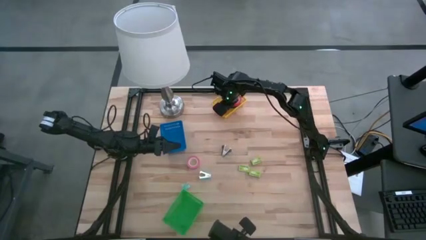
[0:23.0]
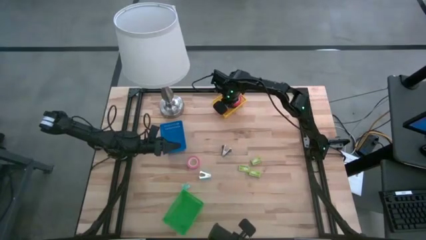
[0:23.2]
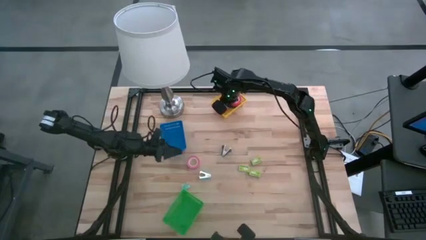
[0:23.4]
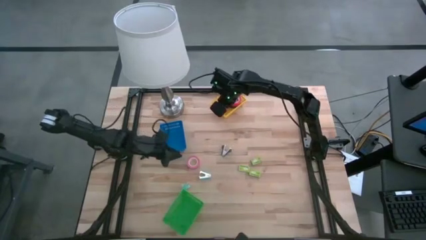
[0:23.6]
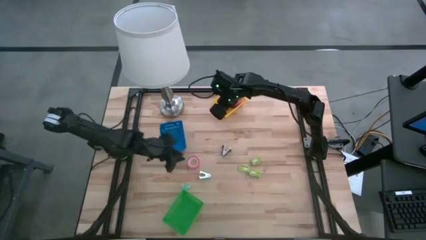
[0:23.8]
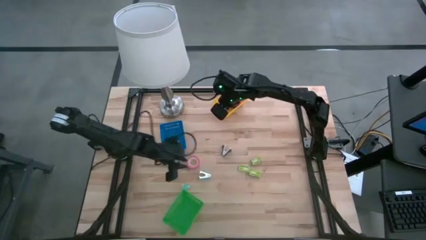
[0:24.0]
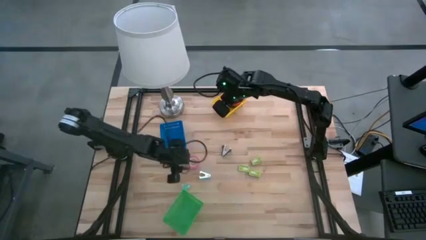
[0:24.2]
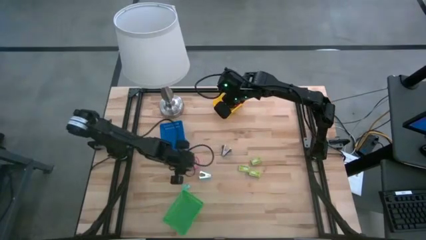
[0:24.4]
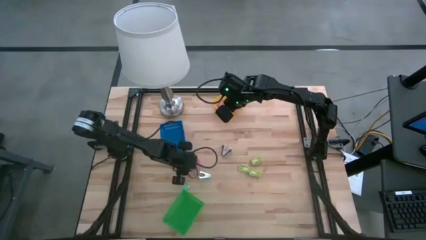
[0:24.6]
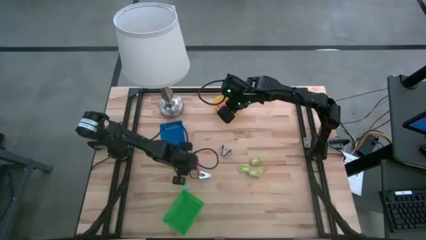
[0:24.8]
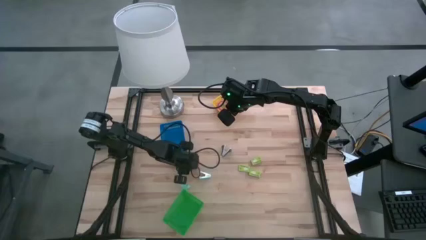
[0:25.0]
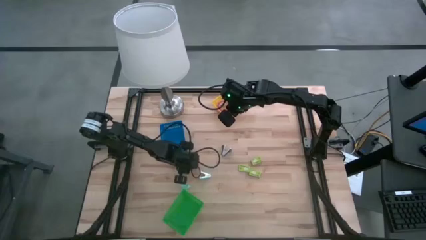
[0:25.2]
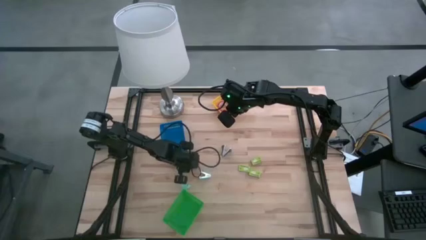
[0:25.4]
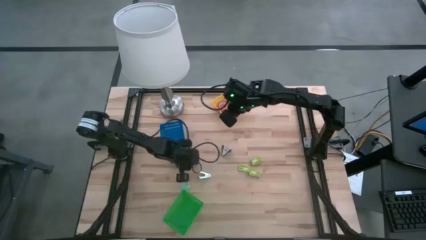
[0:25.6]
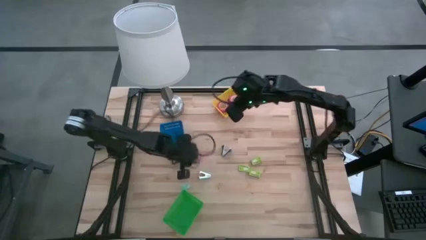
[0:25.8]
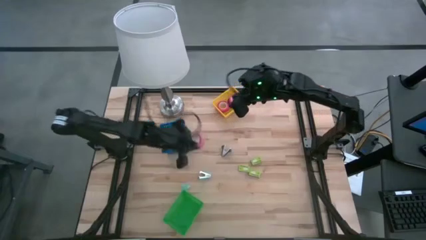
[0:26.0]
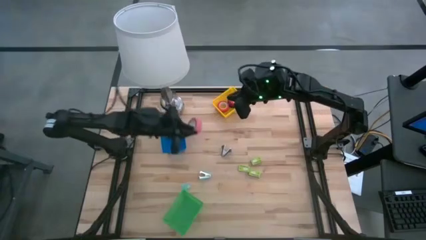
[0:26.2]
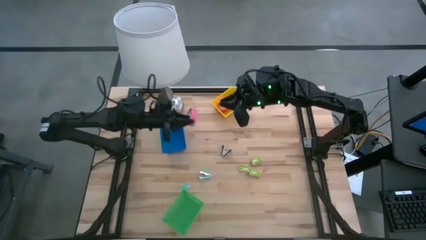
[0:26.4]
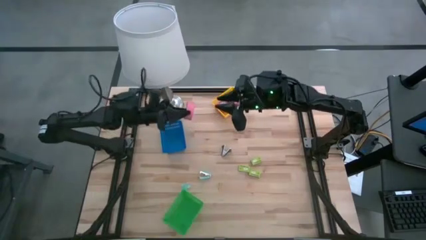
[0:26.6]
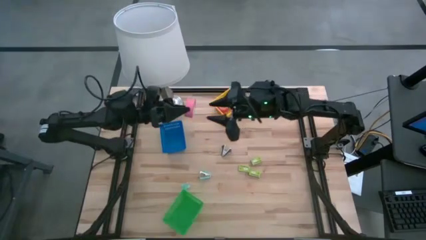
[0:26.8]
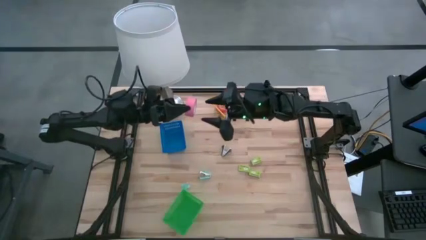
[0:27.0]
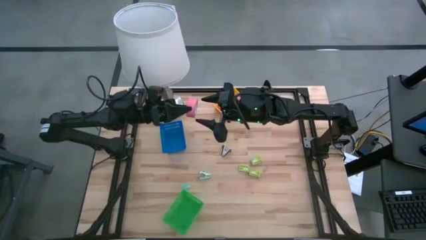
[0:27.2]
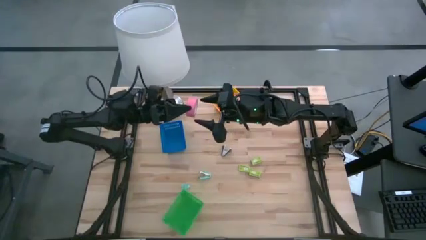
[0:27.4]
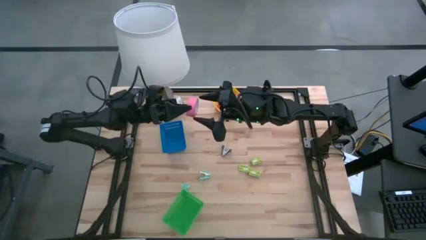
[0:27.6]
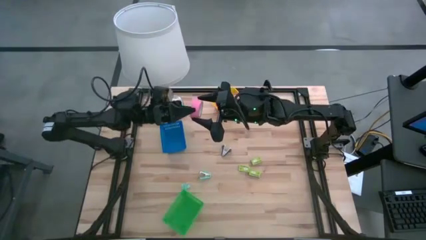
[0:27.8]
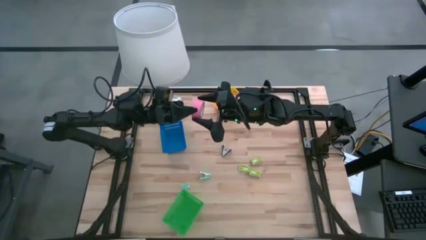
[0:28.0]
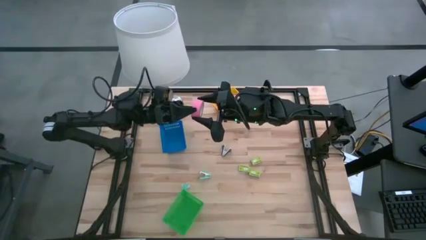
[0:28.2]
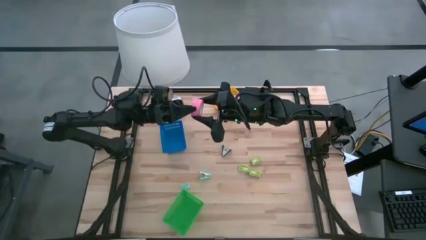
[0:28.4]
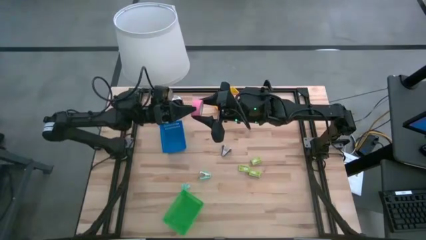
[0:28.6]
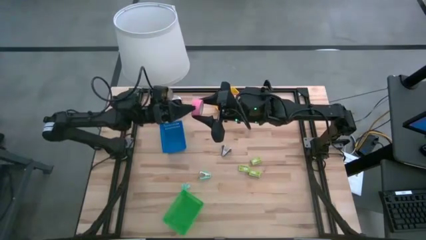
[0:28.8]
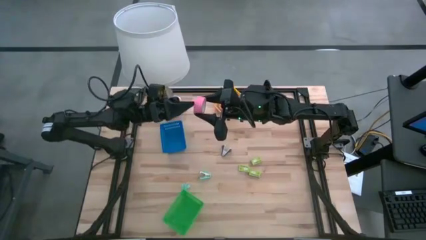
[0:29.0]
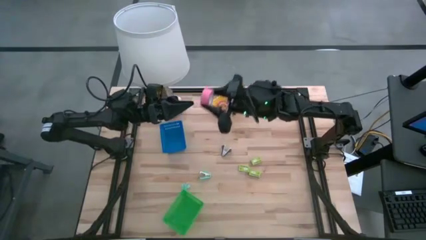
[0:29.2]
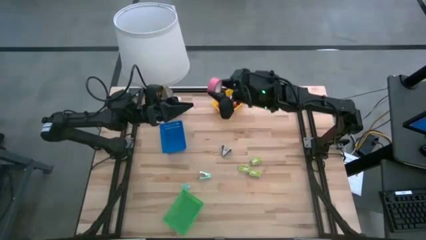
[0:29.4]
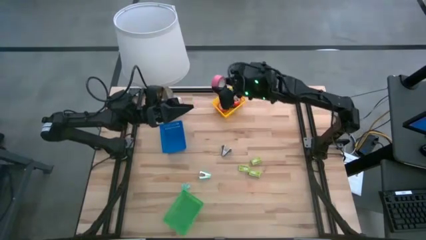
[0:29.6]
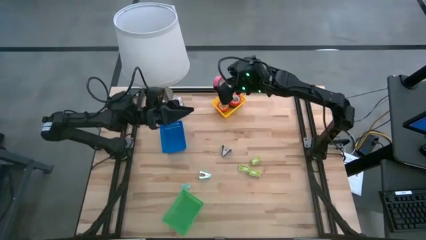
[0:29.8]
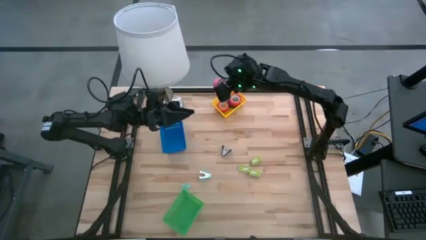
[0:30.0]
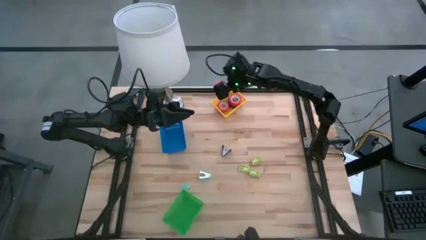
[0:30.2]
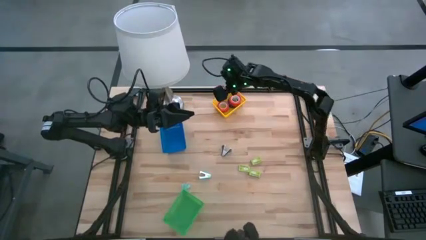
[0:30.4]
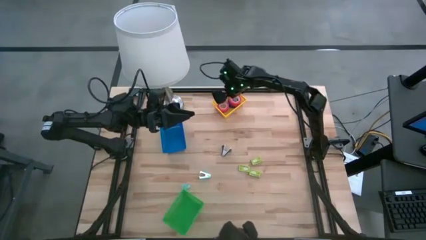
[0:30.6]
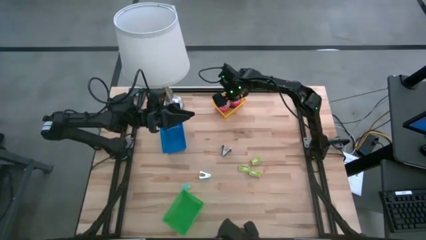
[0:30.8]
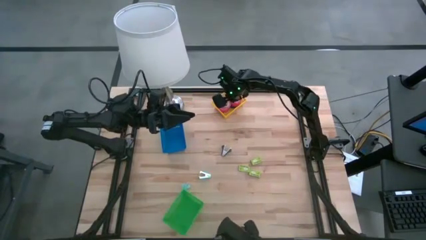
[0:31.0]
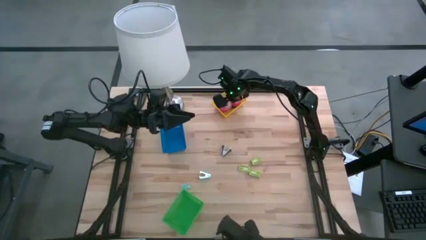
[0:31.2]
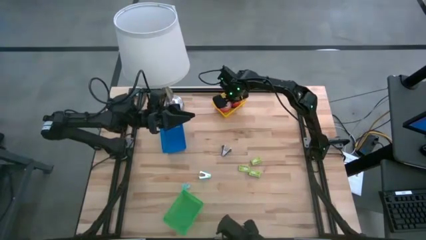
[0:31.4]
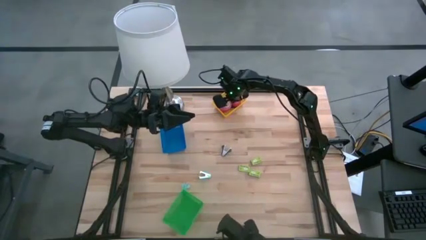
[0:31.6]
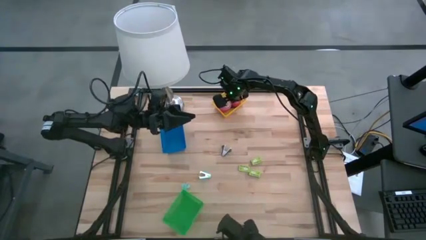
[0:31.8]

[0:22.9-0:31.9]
Task: Pick and place Stapler, Stapler remover, tape
Put the pink tape into the yellow bin

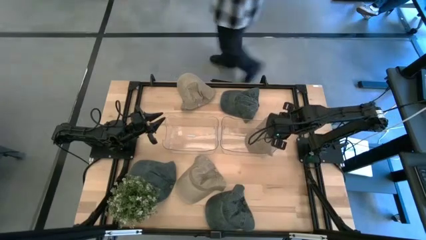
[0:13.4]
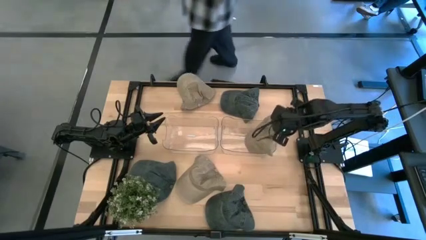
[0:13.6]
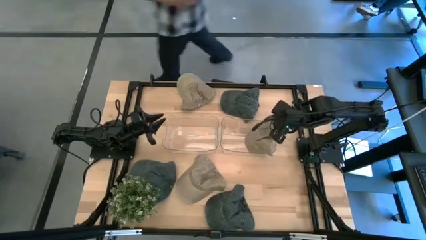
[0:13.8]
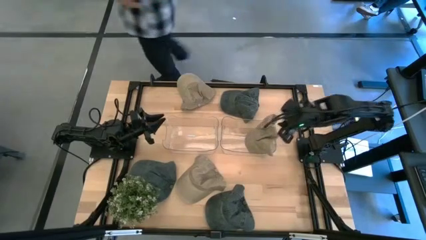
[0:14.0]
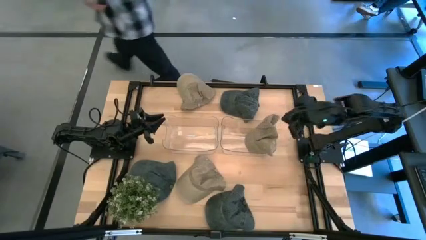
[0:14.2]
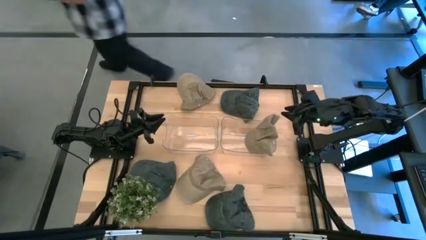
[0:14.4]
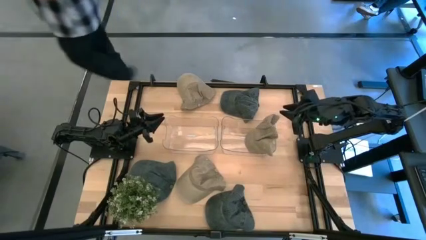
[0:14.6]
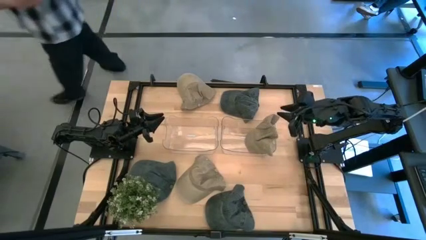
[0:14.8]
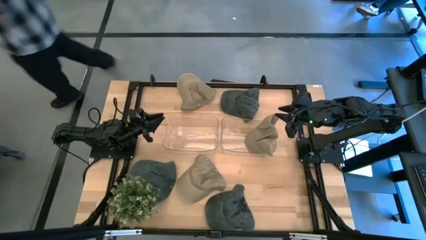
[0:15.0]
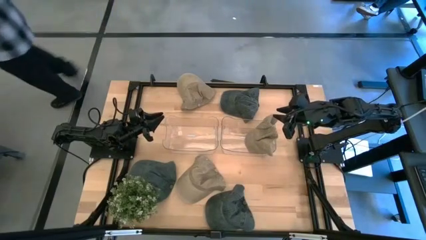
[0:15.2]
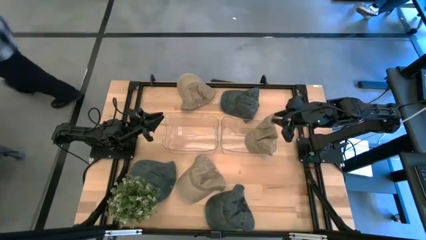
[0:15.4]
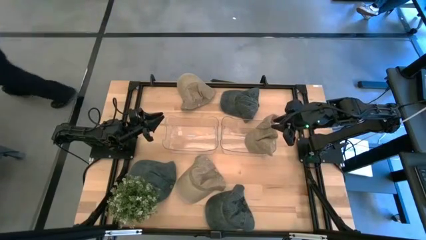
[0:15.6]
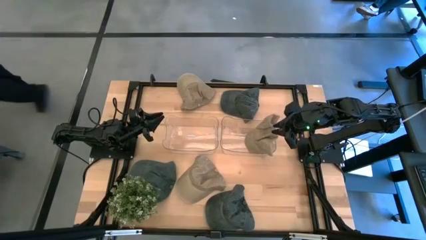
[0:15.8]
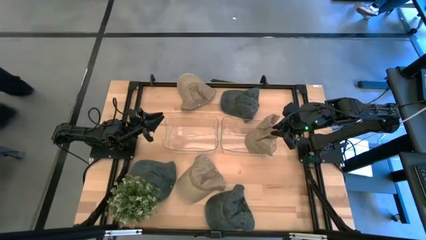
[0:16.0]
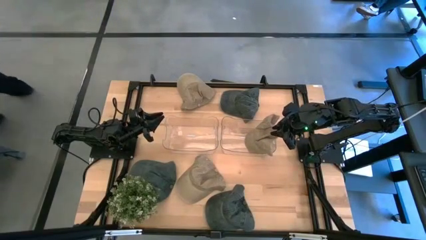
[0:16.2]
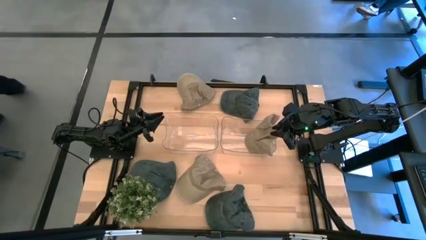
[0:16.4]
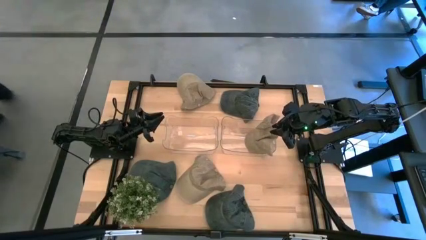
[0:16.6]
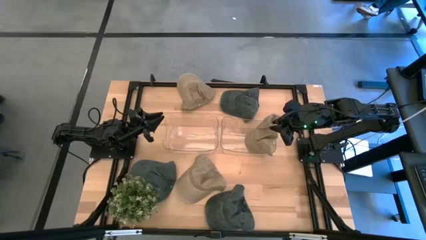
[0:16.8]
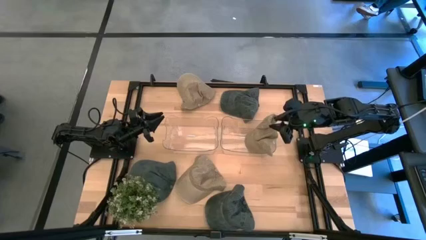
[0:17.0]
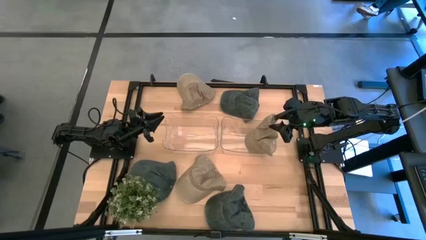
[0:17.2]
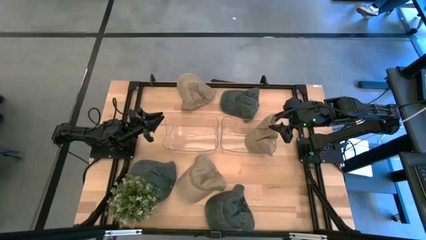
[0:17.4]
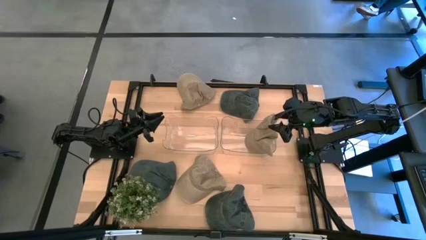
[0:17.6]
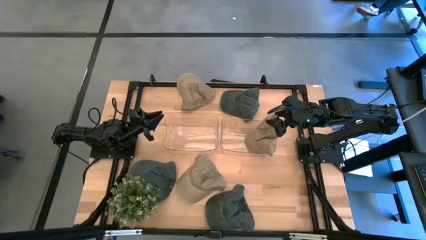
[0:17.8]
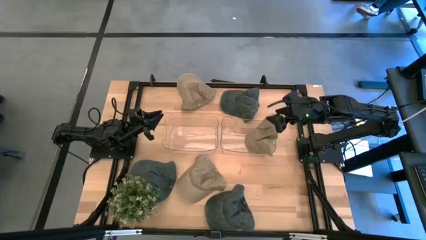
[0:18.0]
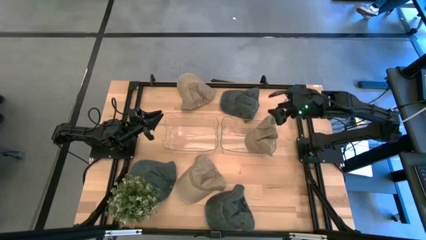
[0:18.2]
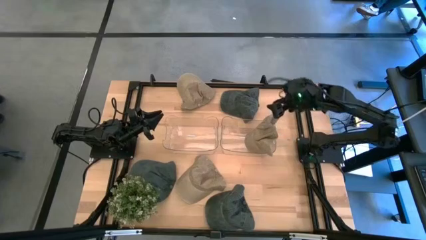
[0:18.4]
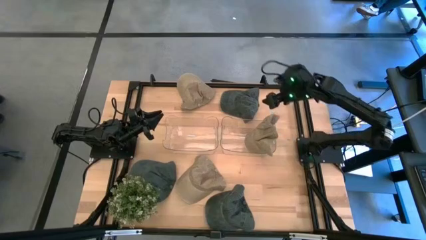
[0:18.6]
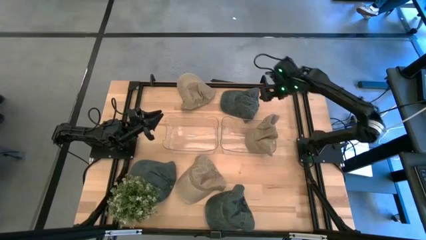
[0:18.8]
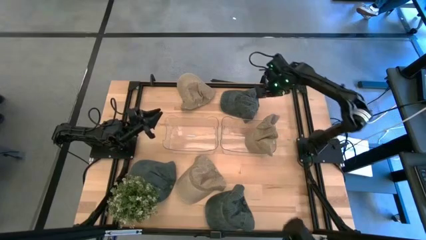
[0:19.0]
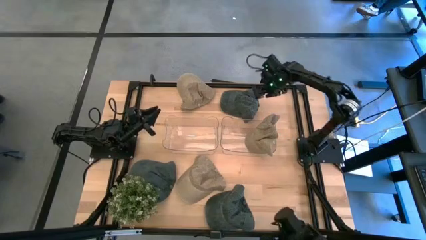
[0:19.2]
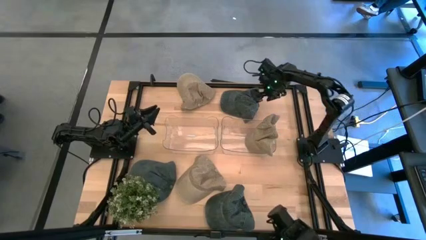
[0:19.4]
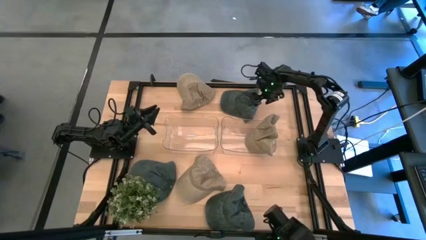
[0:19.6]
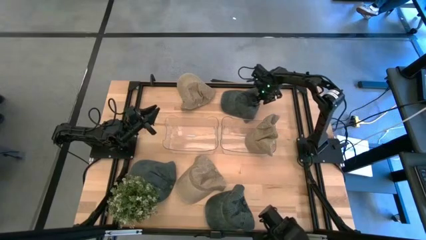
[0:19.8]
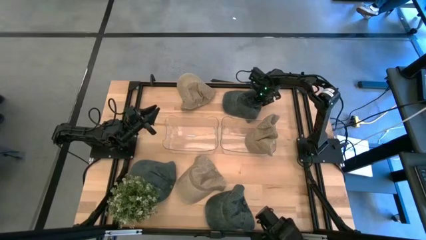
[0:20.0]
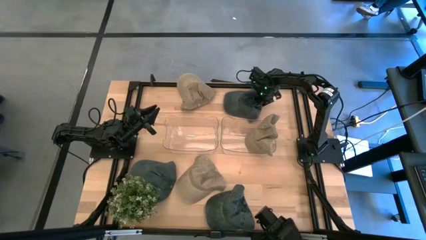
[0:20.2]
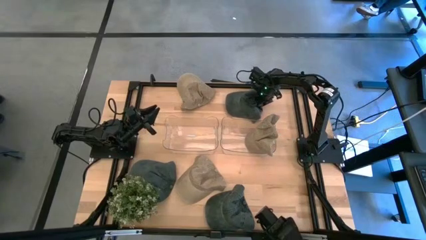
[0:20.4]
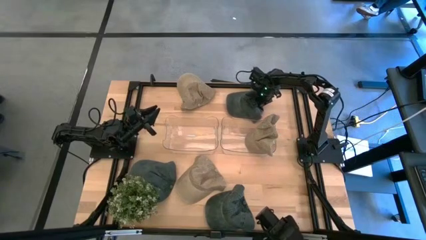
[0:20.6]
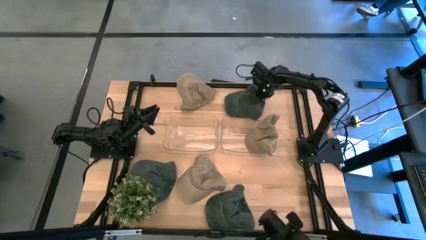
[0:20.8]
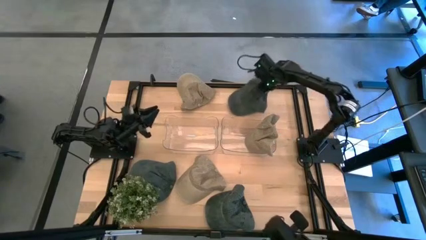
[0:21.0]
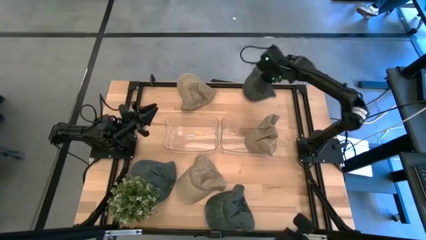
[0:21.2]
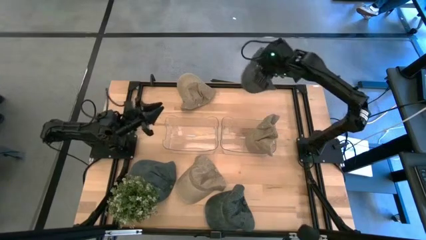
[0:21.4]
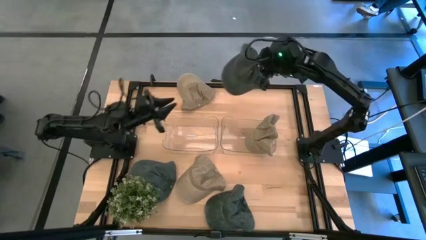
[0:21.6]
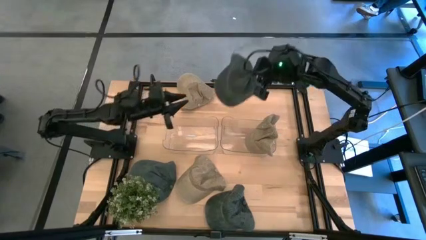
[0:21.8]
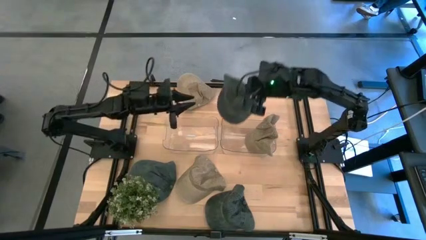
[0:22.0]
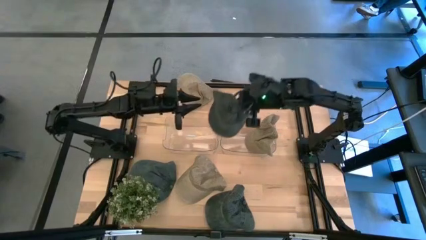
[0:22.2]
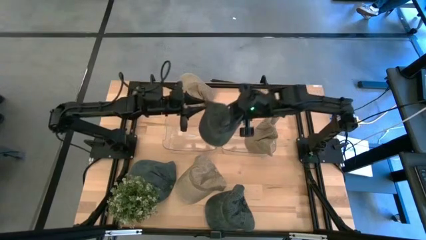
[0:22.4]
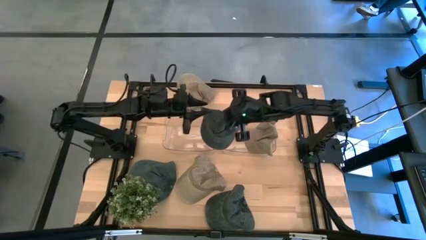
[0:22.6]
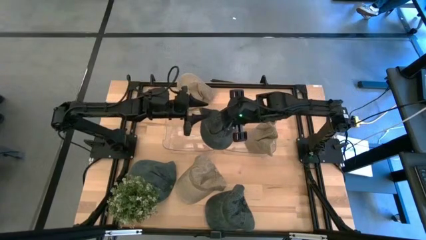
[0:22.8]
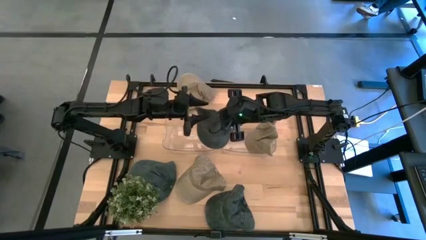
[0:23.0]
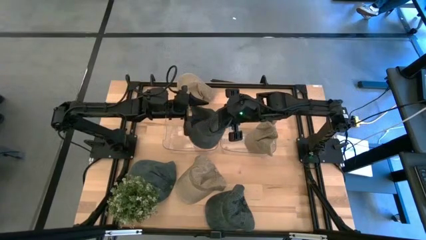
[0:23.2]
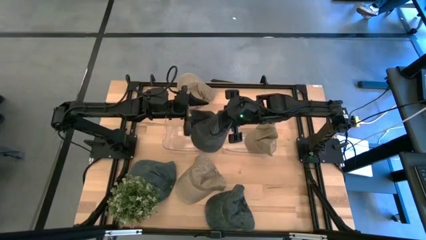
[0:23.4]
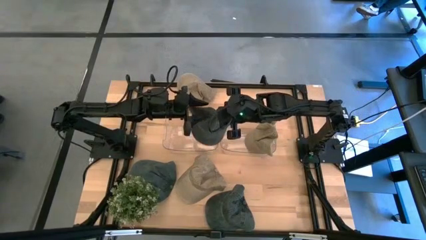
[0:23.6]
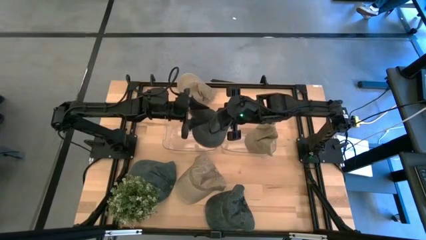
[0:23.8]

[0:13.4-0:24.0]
Task: Pick & Place hat
Put the top blue cap into the left transparent bin
